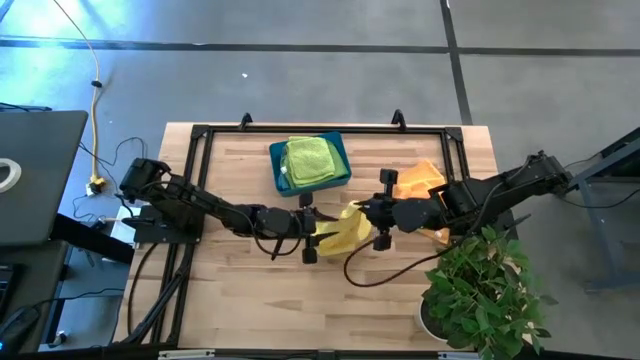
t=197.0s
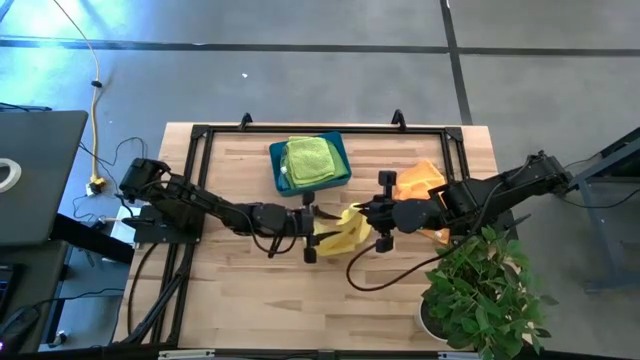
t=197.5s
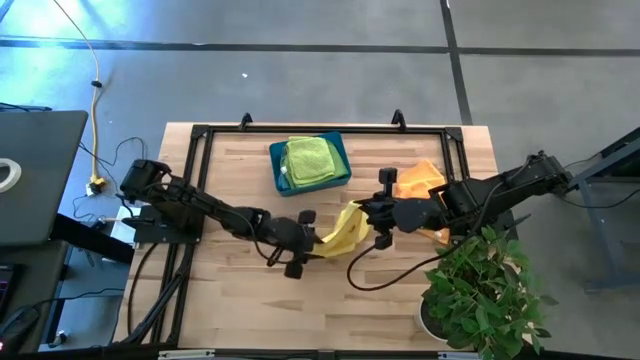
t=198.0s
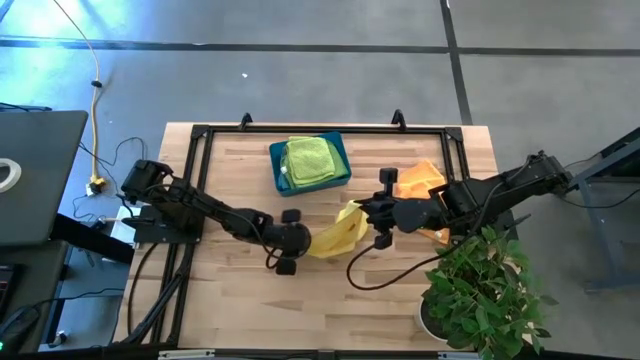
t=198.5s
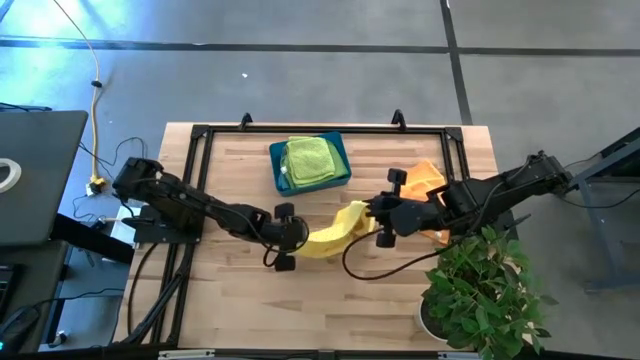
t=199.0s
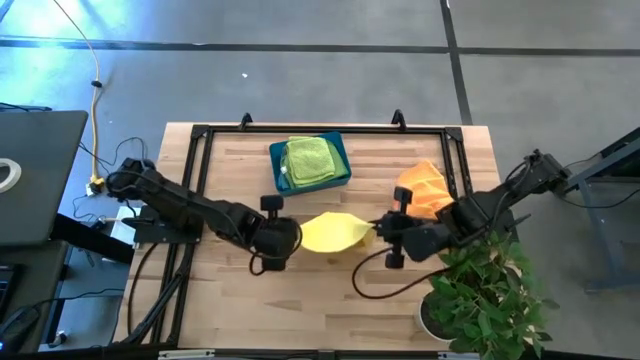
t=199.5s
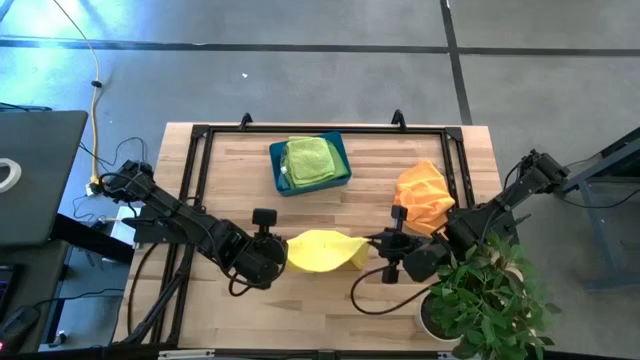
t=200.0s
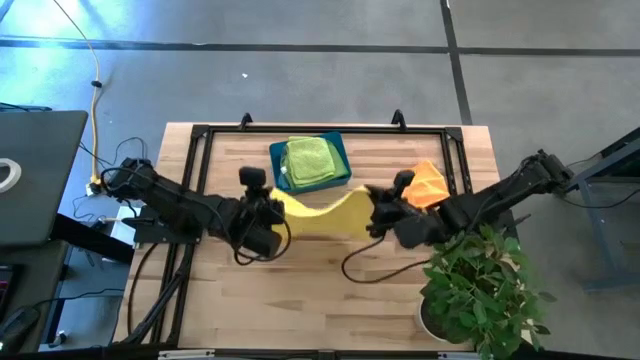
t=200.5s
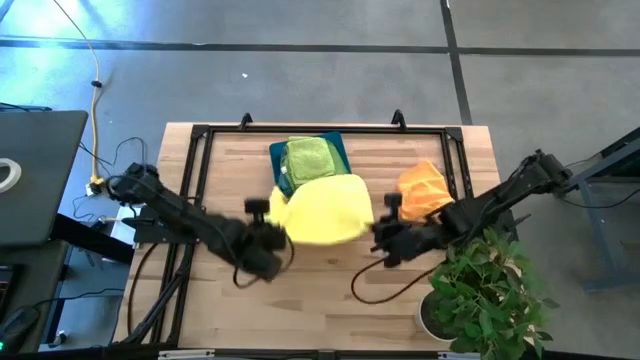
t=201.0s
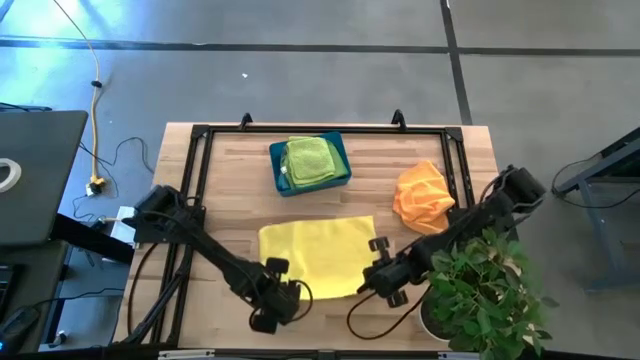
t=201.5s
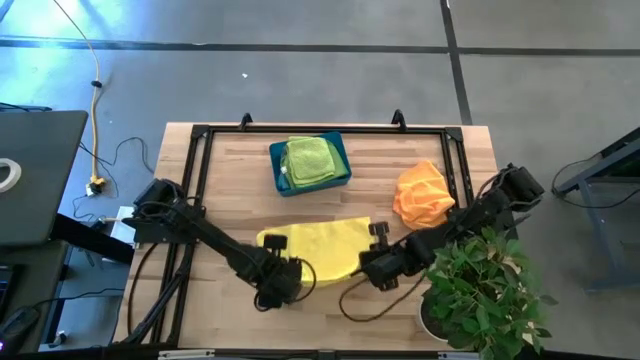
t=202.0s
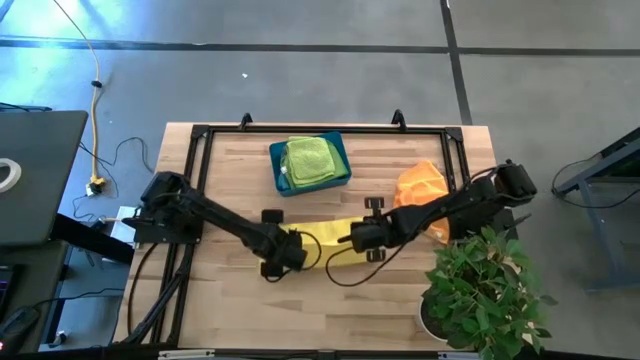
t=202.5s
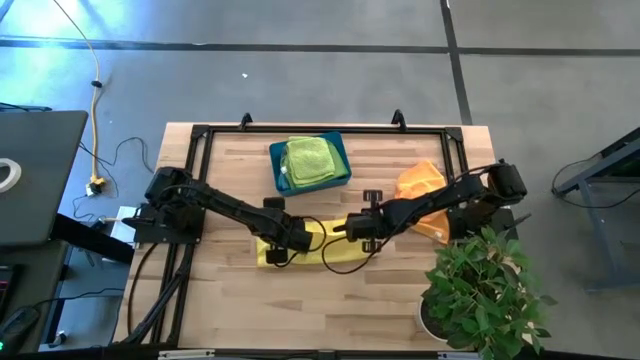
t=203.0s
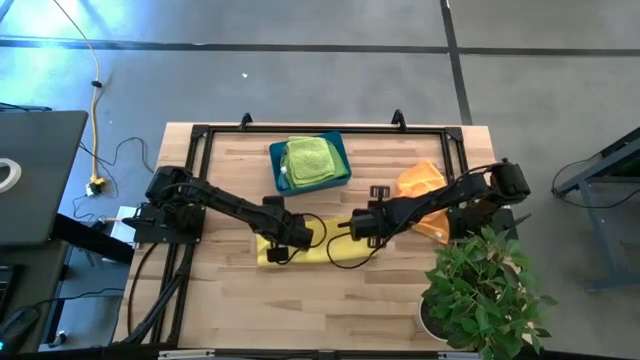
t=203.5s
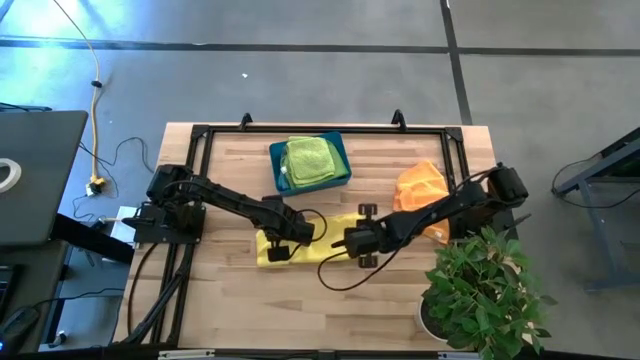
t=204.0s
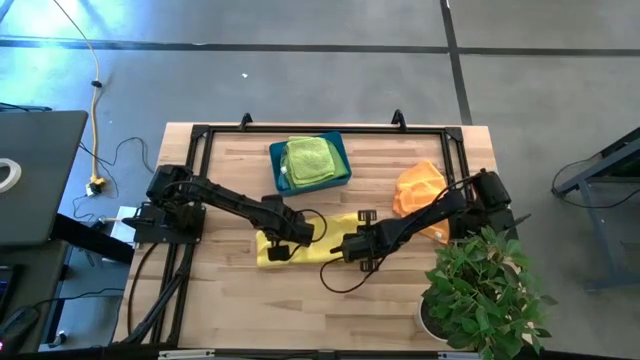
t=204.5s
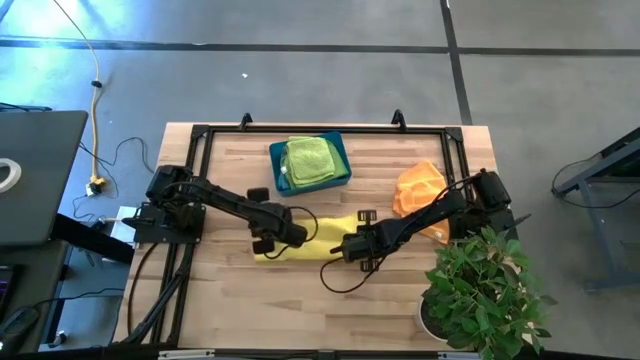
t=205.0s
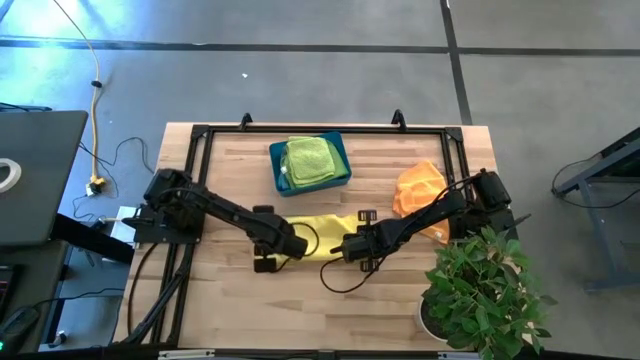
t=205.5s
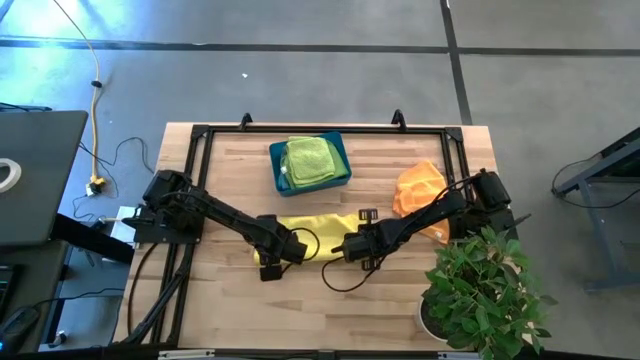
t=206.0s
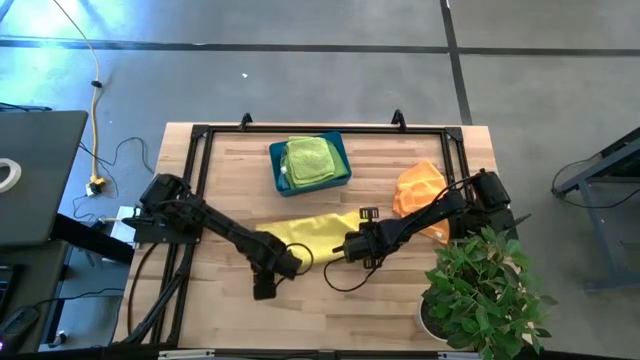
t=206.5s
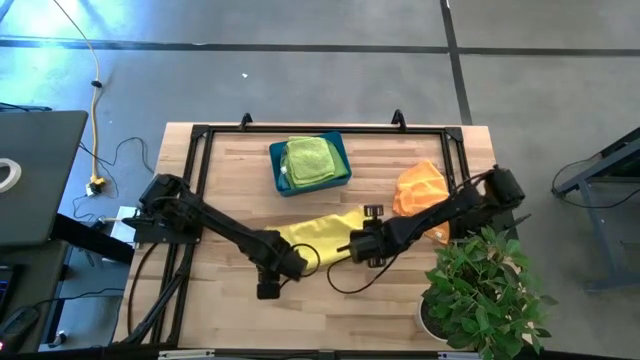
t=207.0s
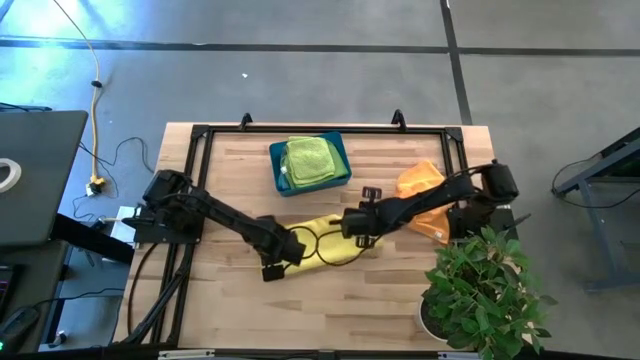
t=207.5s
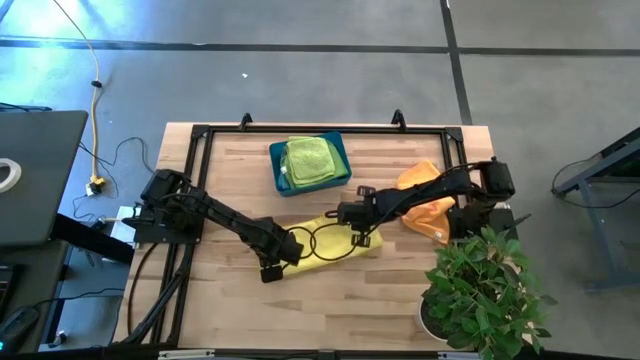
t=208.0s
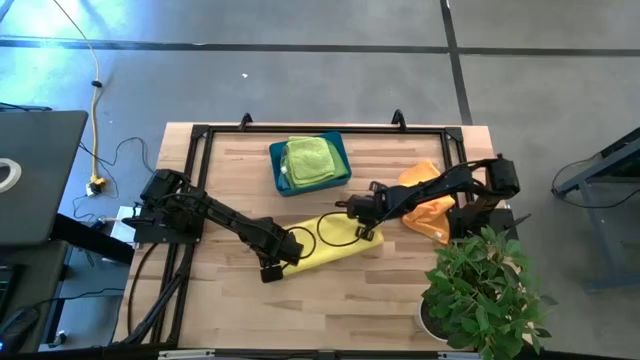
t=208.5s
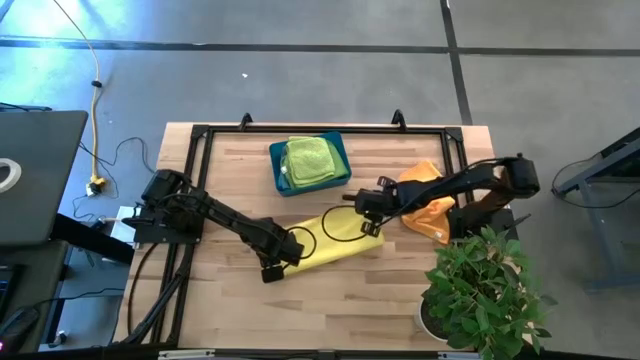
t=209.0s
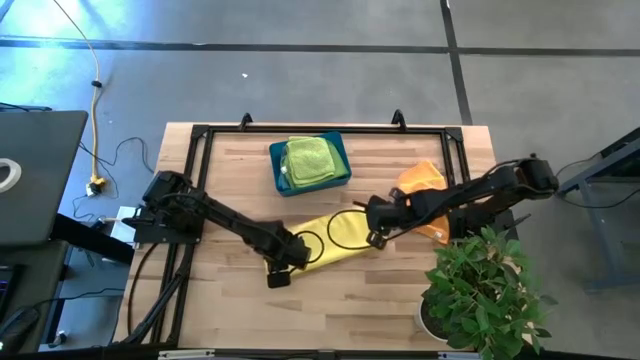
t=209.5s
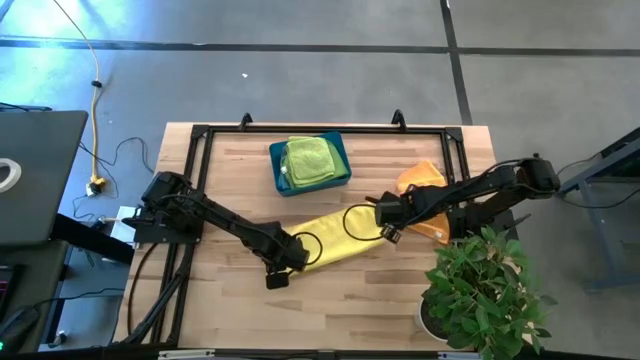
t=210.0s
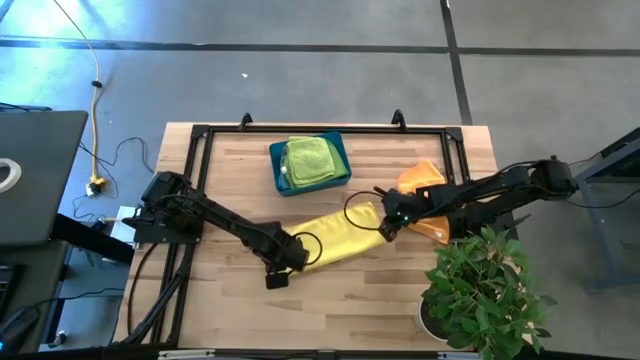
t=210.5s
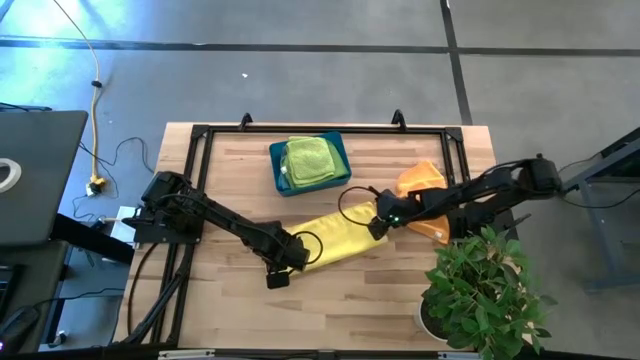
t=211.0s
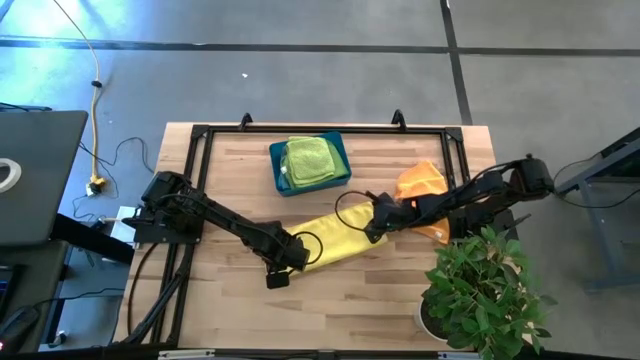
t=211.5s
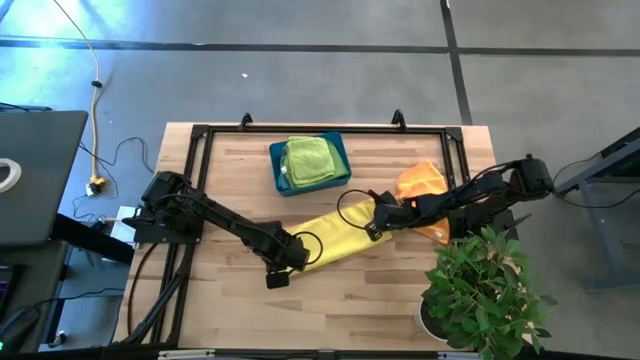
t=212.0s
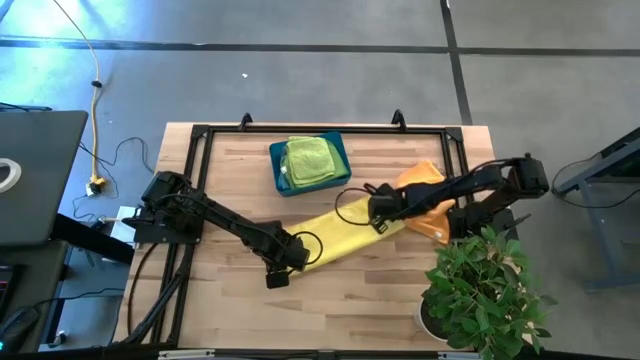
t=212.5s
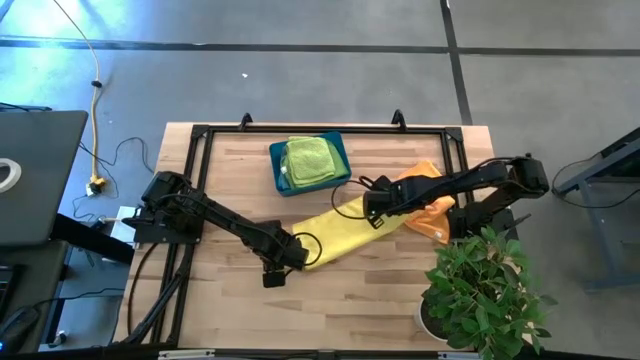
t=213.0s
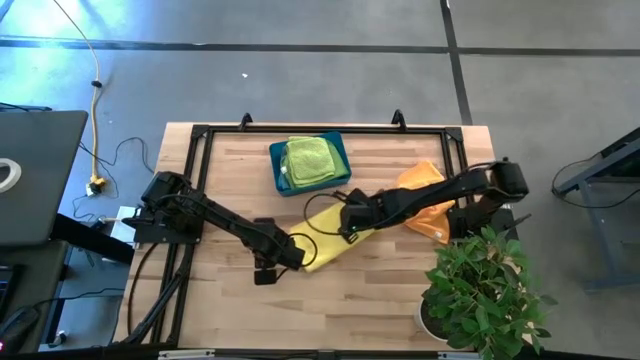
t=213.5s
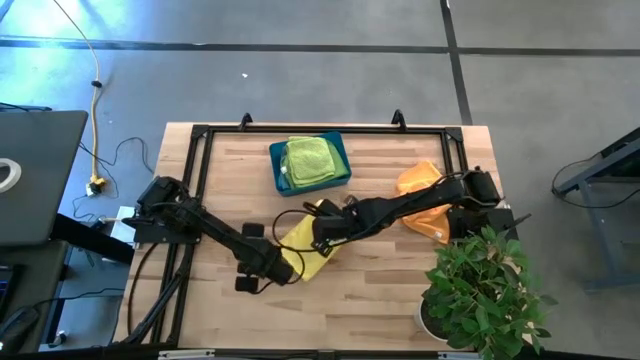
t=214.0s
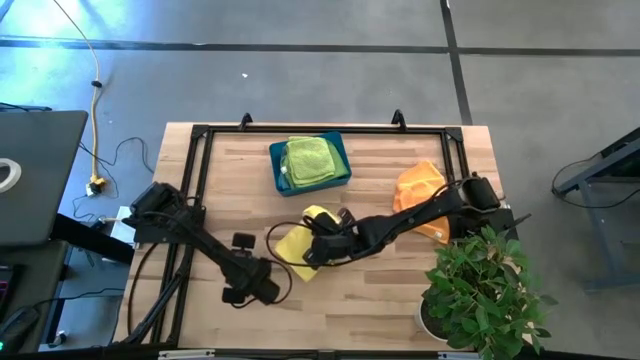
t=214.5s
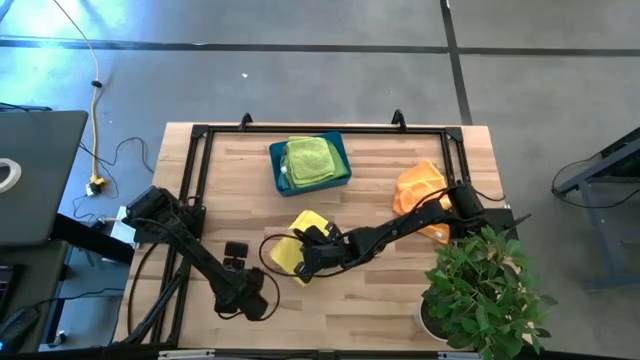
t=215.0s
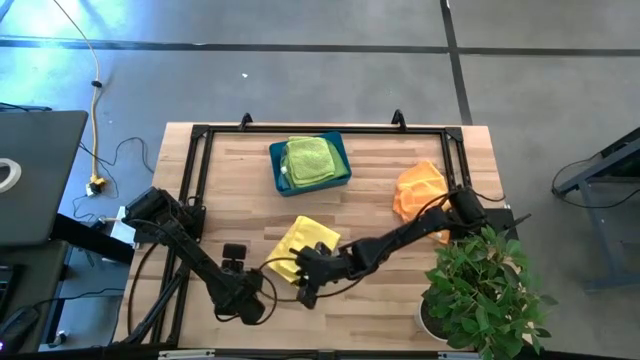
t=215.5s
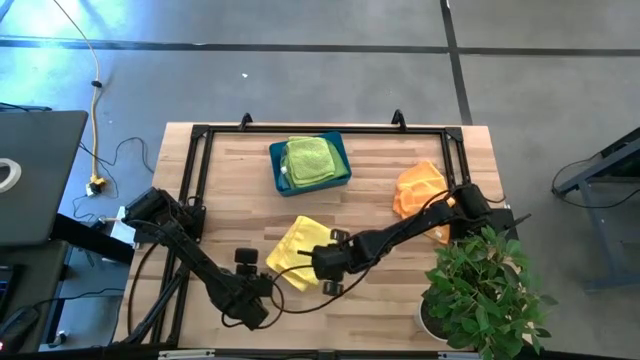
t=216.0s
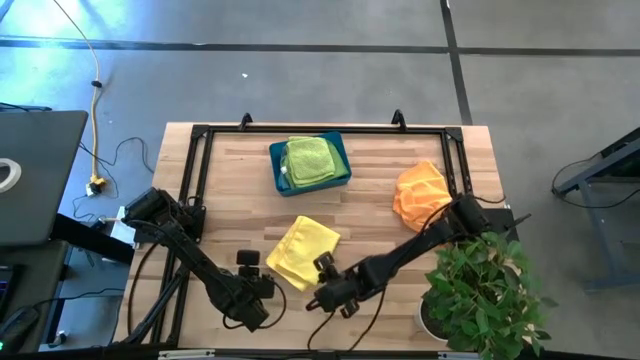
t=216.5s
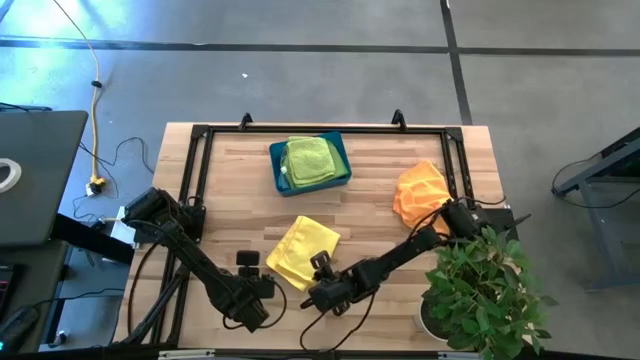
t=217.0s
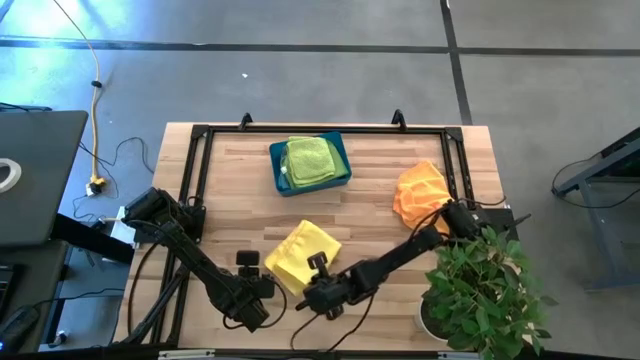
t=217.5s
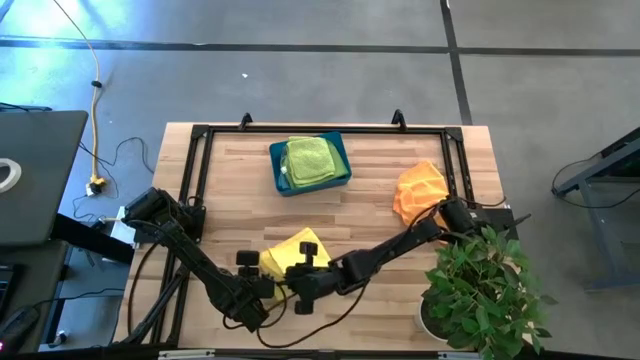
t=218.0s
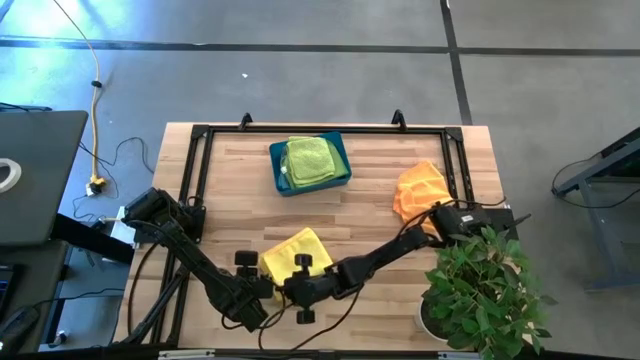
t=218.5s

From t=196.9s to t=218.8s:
Task: Fold microfiber towels
Fold the yellow microfiber cloth
